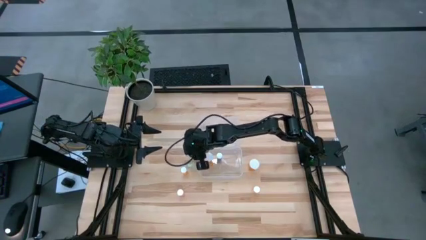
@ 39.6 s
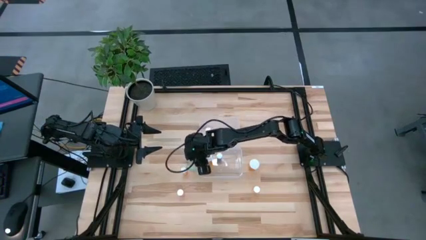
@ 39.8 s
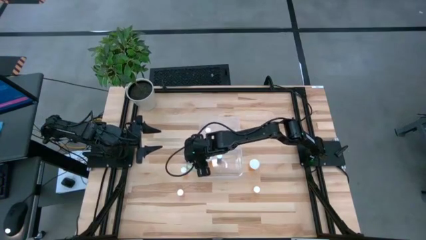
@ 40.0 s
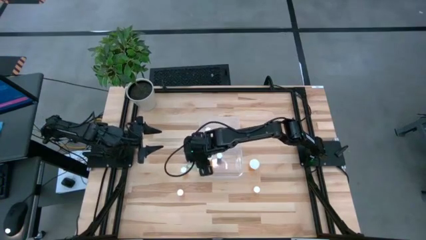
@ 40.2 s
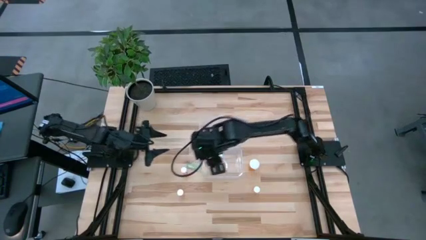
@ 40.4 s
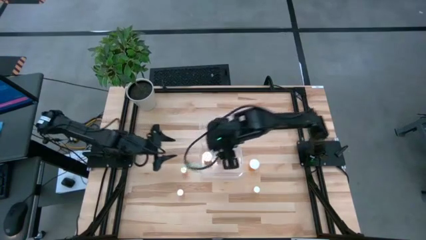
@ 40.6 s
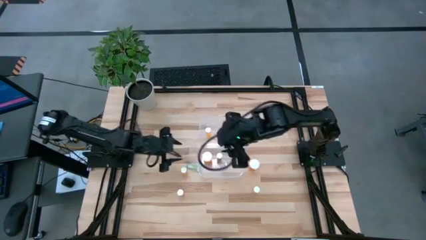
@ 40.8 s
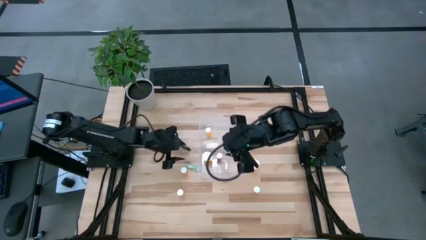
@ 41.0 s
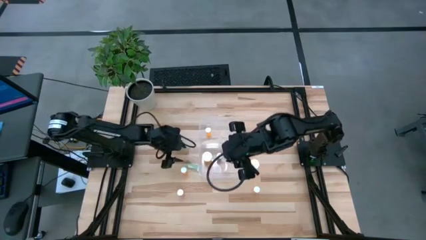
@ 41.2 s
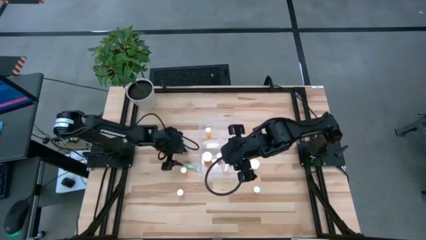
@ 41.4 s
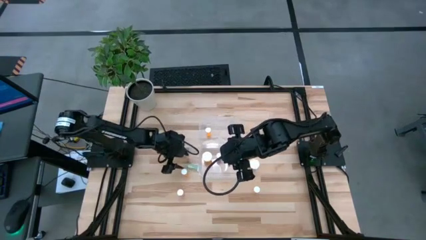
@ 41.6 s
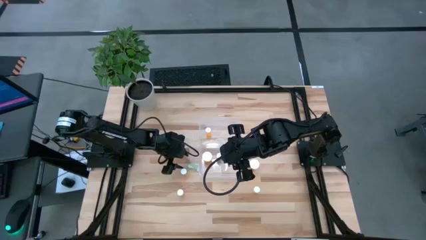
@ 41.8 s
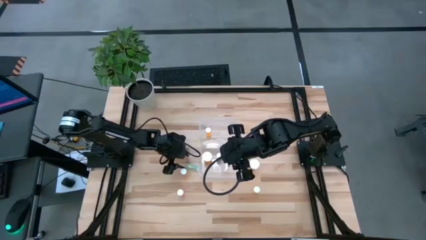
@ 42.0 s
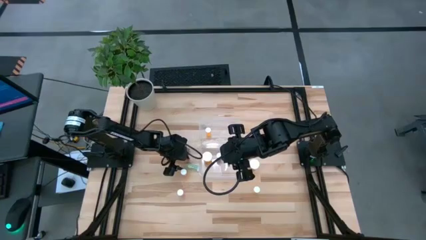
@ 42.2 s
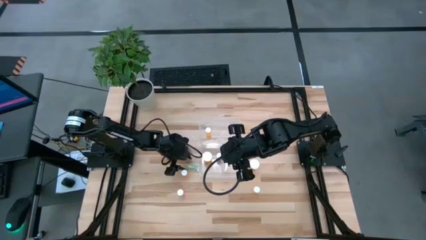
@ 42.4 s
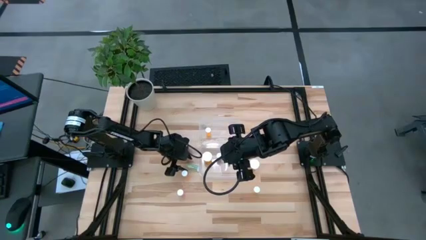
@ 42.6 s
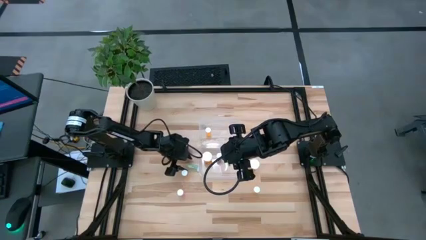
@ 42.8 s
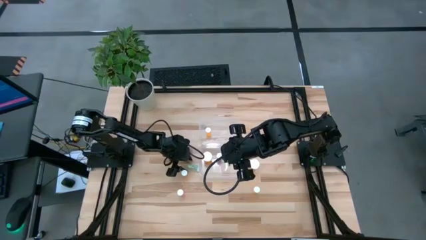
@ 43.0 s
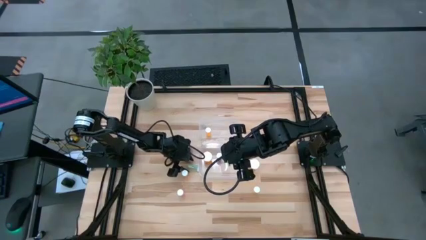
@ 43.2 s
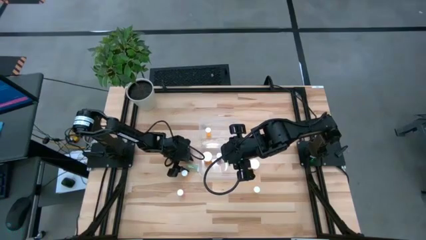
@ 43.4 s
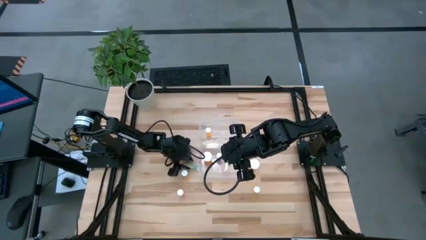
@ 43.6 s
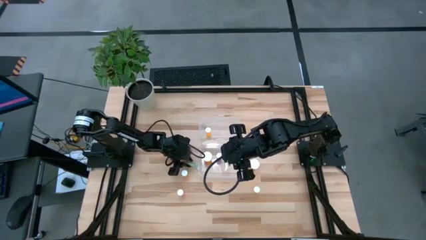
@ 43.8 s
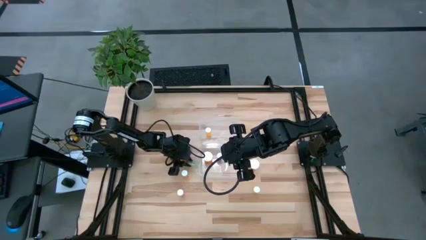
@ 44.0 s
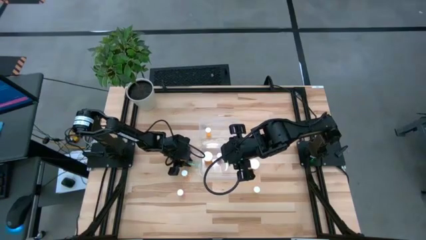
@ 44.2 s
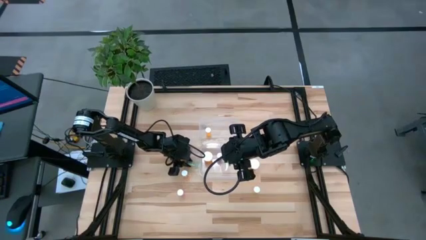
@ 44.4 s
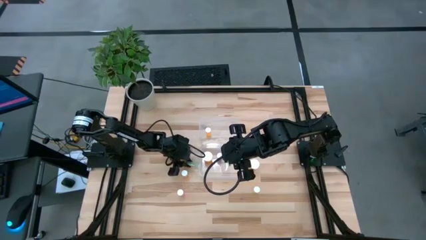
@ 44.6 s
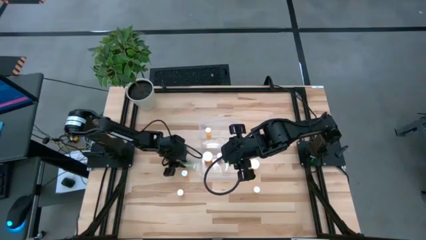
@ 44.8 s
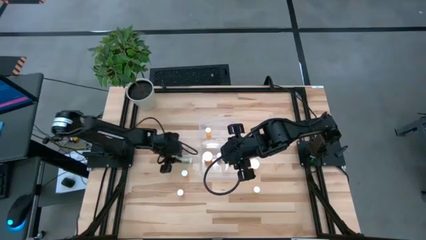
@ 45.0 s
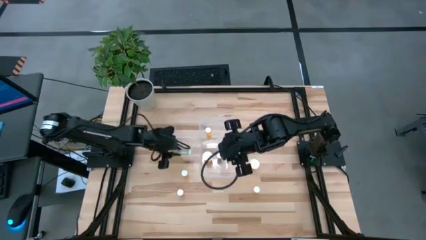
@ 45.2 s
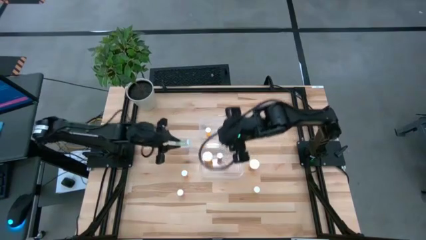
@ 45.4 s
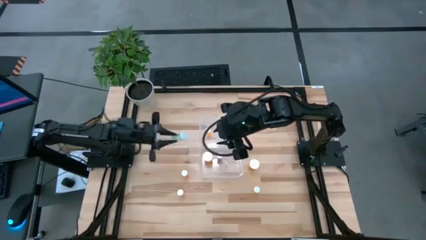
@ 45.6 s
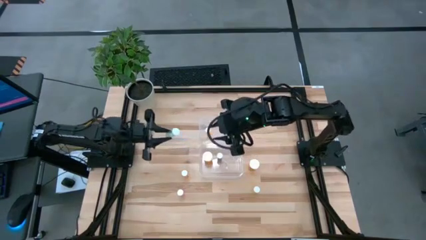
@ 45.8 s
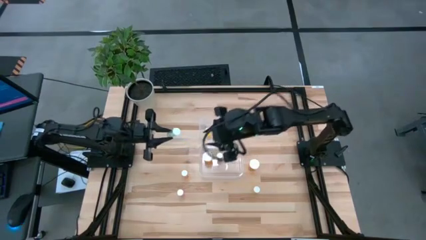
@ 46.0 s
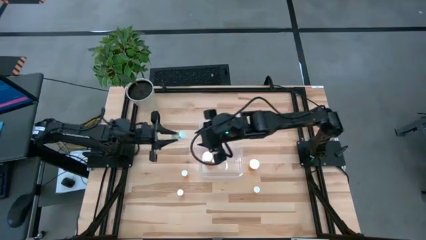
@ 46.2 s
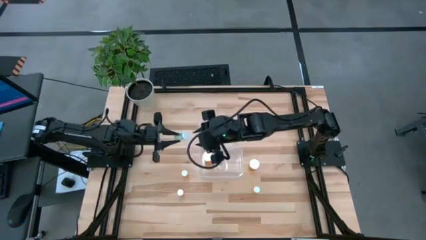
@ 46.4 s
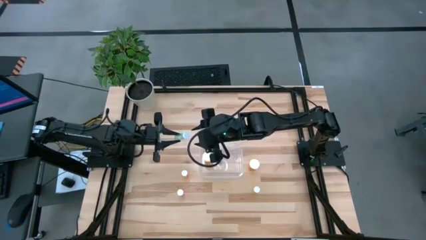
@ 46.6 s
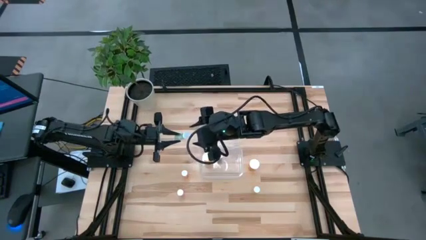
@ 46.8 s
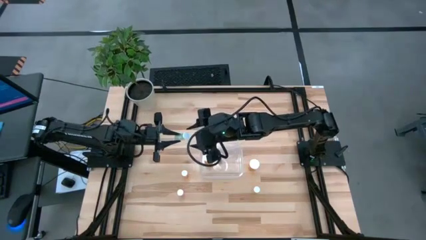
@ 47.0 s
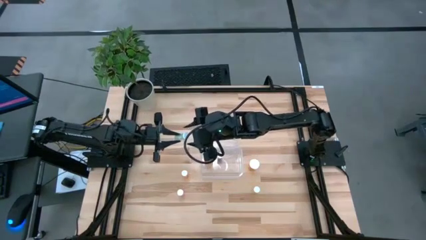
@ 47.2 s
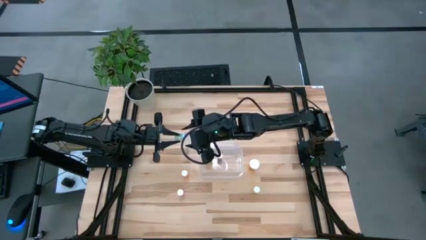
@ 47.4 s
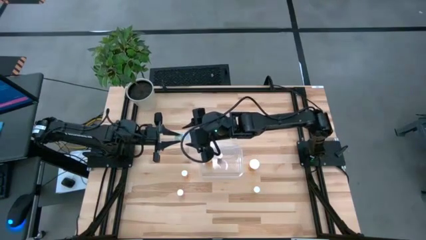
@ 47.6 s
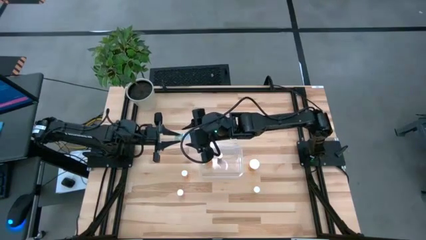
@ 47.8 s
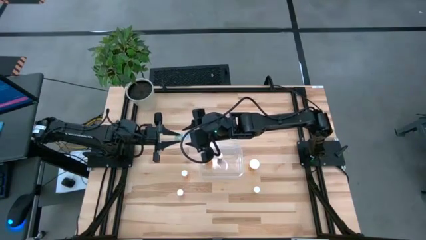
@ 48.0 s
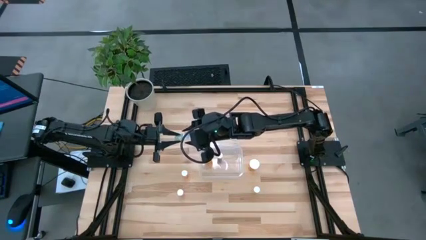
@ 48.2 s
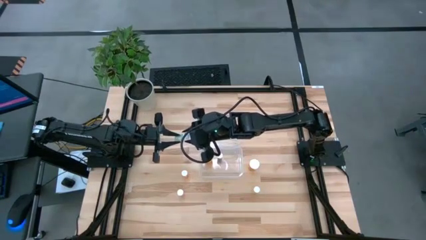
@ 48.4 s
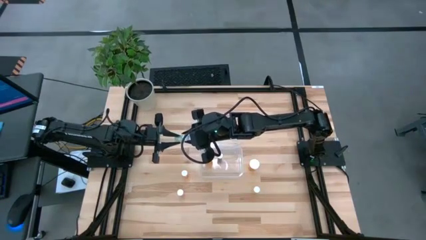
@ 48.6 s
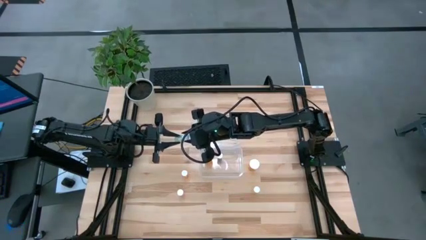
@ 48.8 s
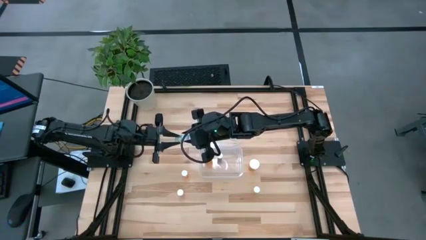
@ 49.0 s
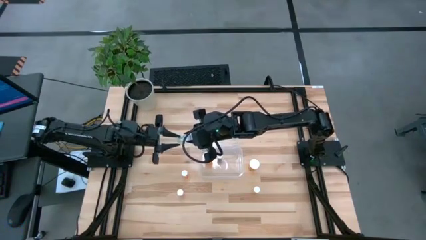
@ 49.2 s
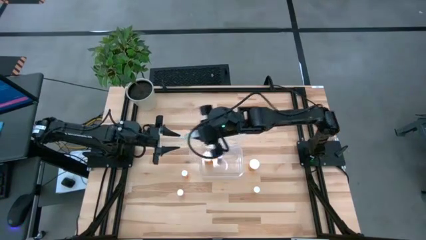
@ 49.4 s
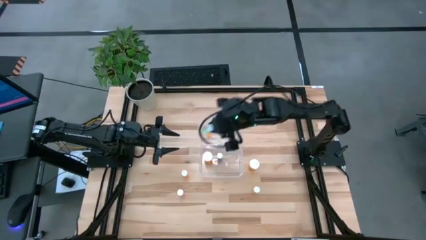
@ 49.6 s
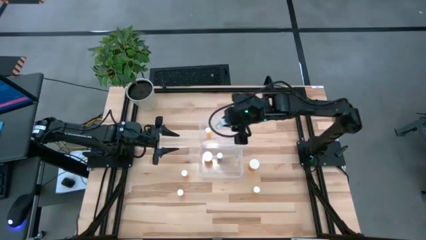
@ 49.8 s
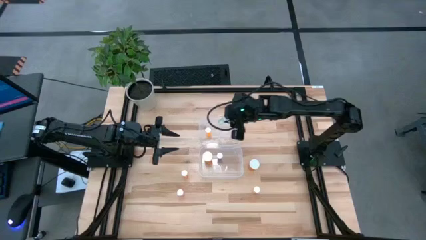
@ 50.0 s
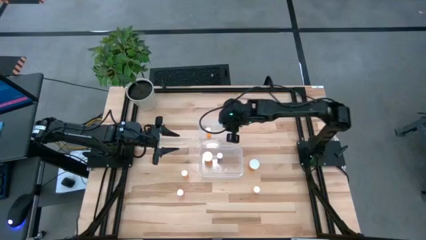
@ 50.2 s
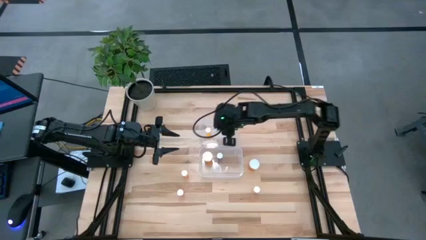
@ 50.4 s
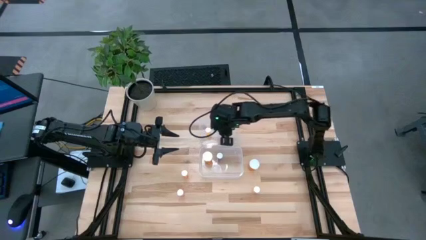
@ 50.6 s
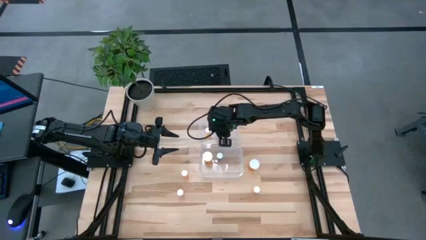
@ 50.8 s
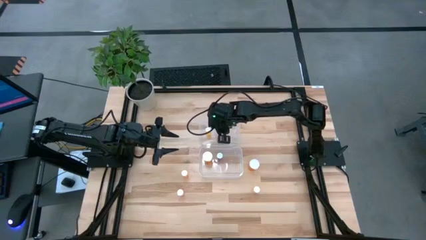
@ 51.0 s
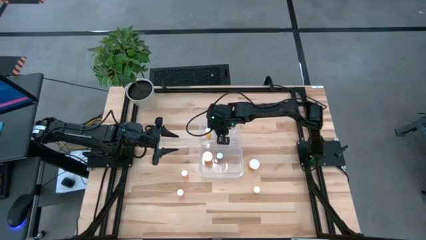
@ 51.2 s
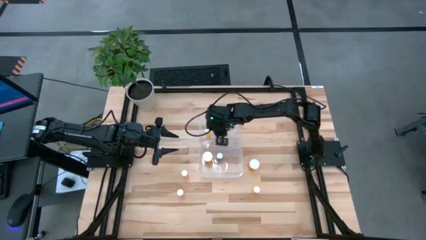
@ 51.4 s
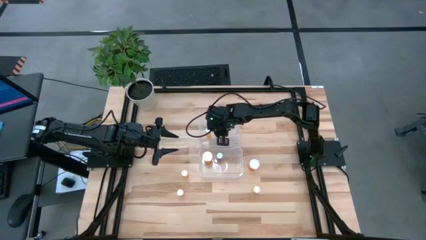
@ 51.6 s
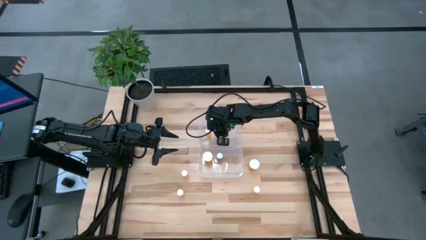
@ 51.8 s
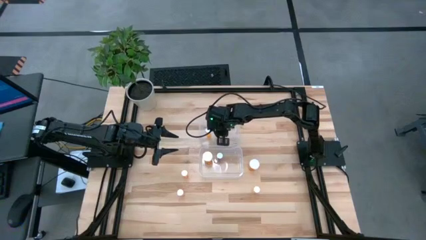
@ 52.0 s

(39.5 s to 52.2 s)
Task: Pick and place medicine bottles into bin by pill shape (circle, oval)
Put the blue tablet bottle into the top transparent bin

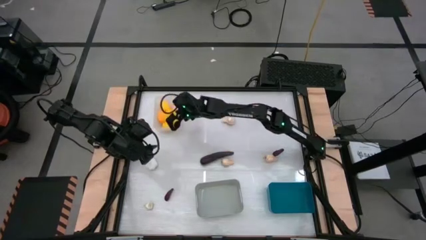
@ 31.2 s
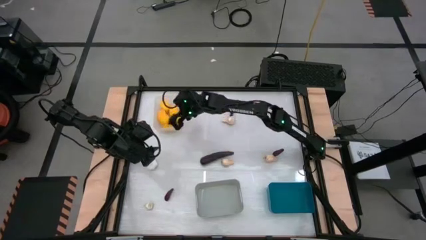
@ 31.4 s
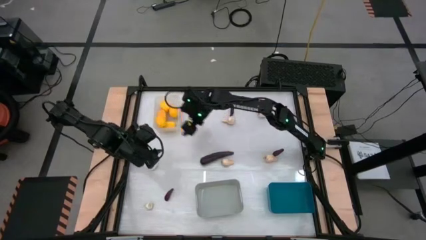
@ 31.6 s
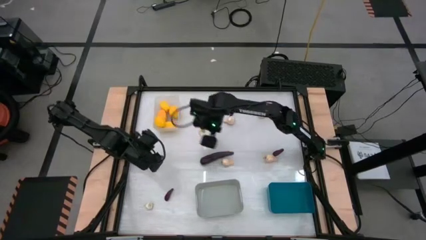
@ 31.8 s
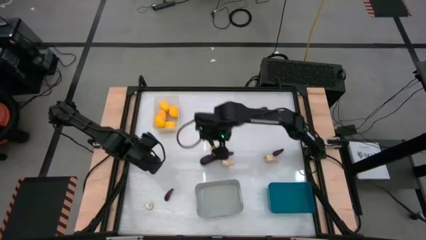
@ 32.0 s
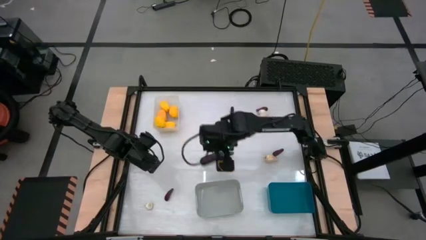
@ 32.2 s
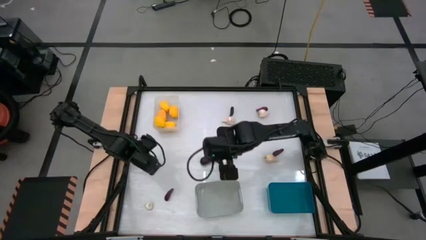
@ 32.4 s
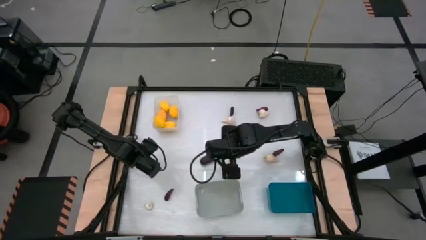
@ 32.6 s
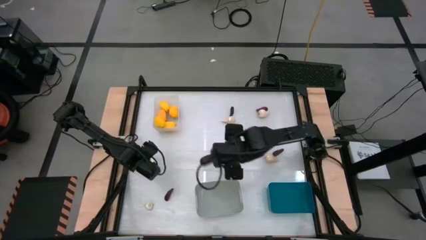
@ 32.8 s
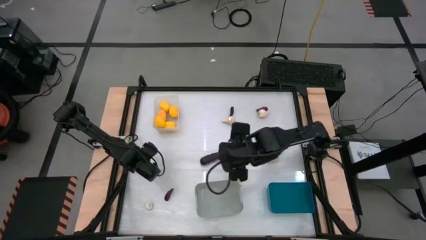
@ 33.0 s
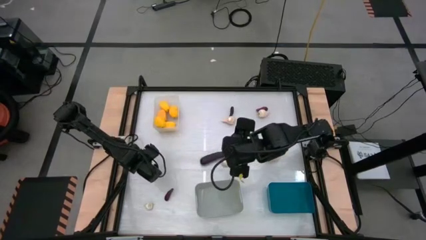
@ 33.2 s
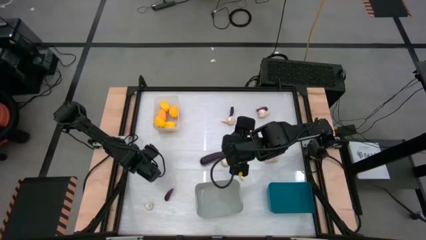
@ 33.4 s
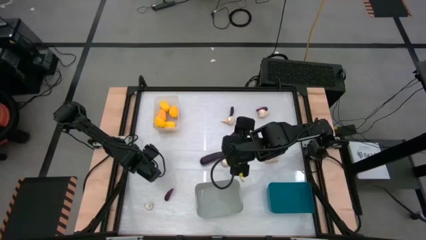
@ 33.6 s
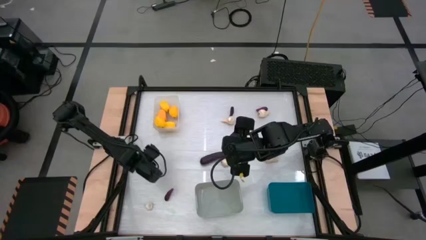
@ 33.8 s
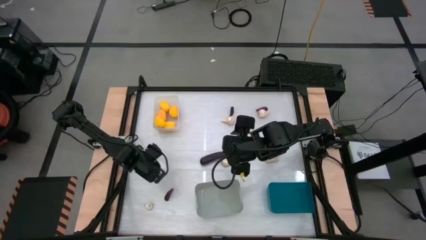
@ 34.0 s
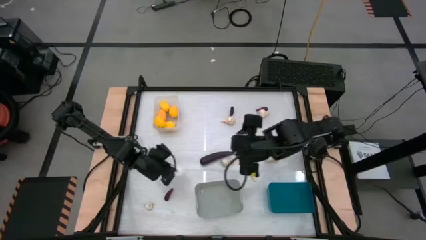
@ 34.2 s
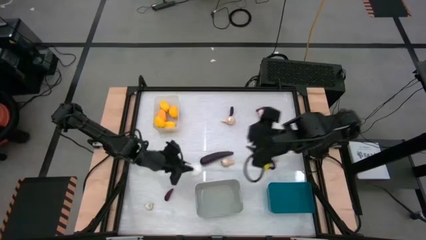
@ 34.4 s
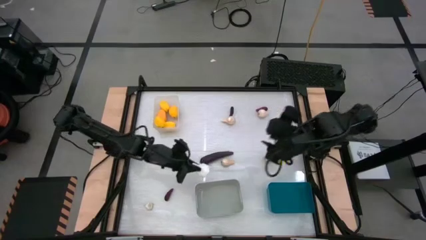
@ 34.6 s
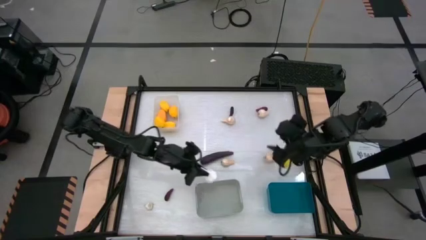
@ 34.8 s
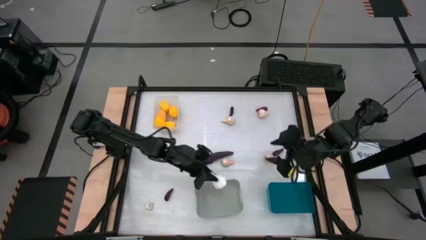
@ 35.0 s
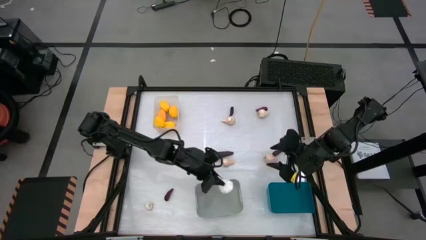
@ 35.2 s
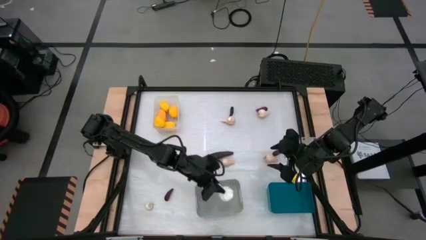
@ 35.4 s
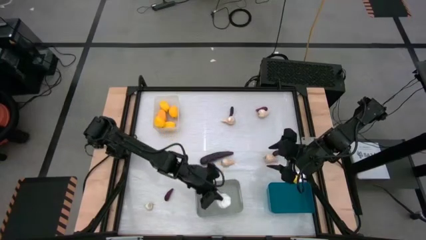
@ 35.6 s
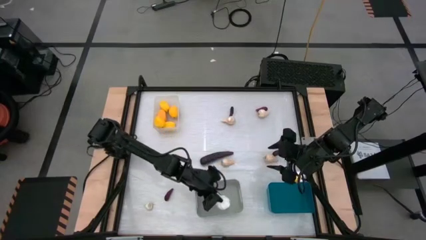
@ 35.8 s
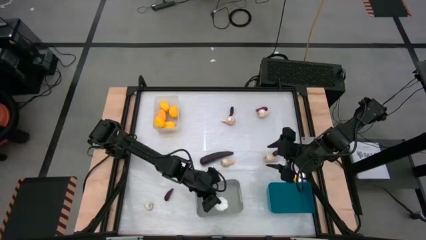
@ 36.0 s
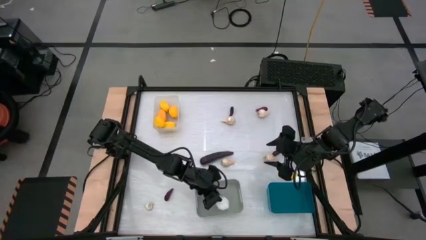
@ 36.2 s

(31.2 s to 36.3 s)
Task: Sort produce into baskets
Put the garlic into the gray bin
